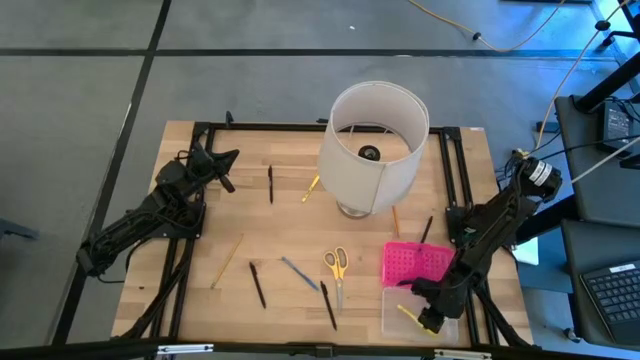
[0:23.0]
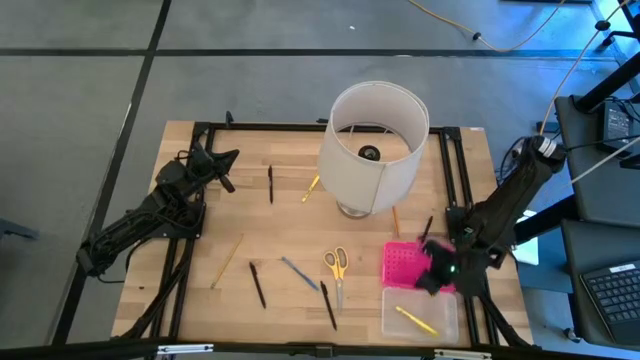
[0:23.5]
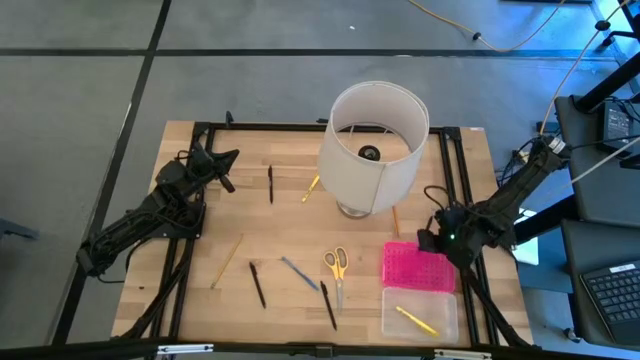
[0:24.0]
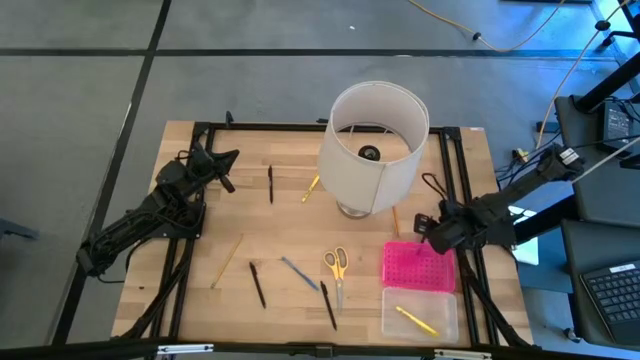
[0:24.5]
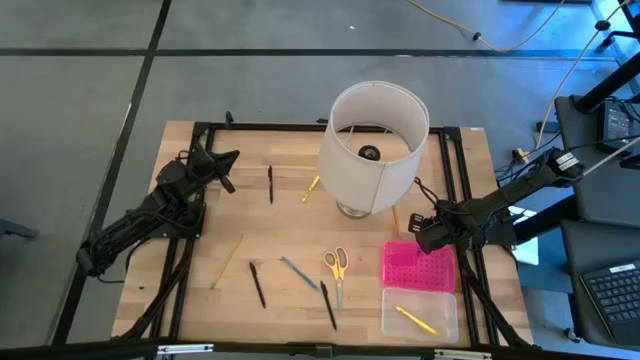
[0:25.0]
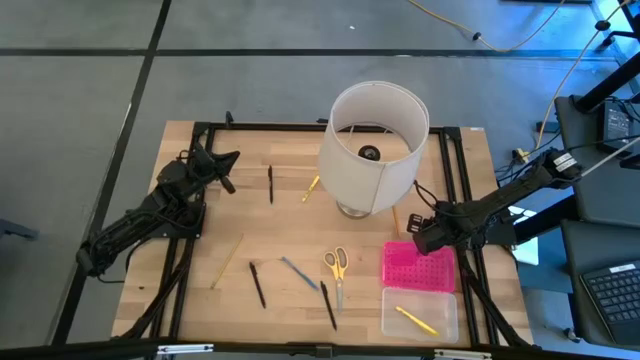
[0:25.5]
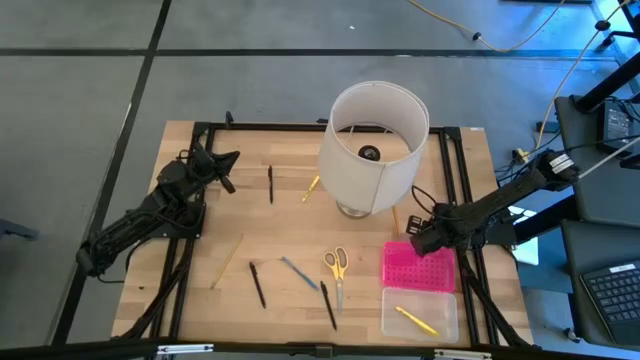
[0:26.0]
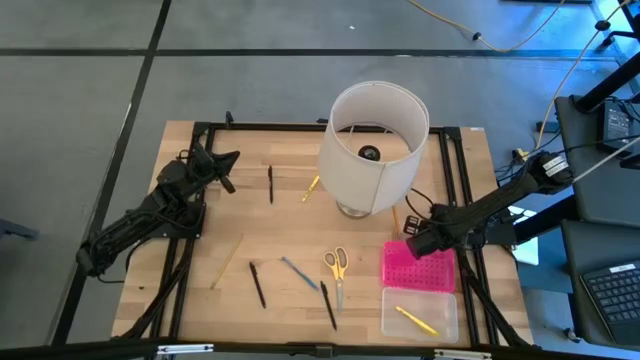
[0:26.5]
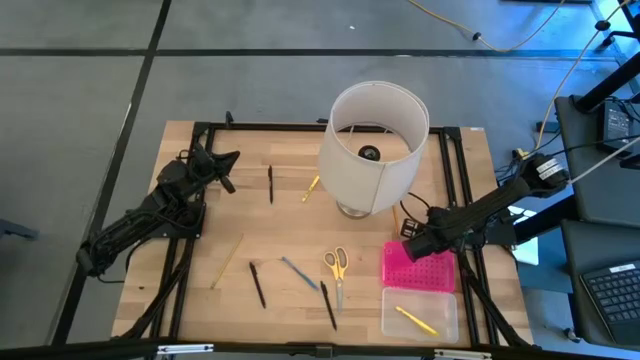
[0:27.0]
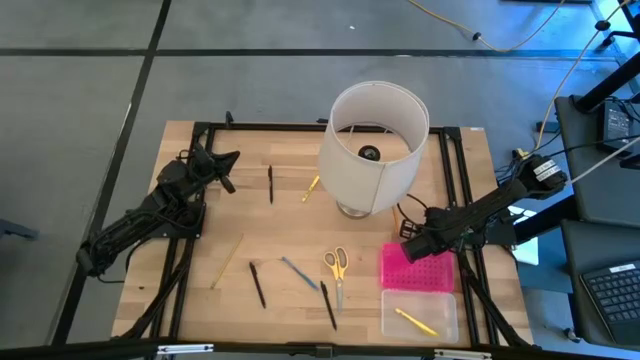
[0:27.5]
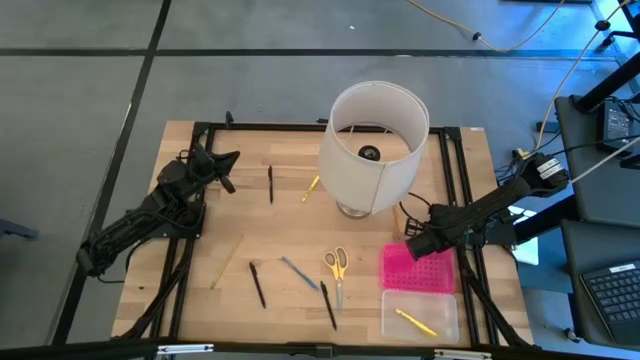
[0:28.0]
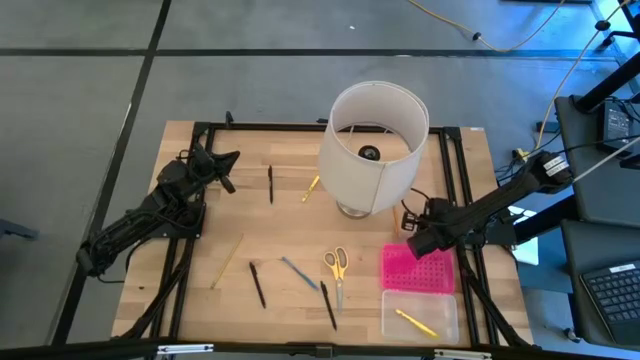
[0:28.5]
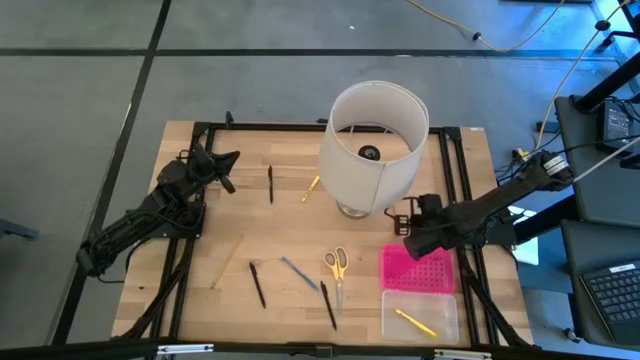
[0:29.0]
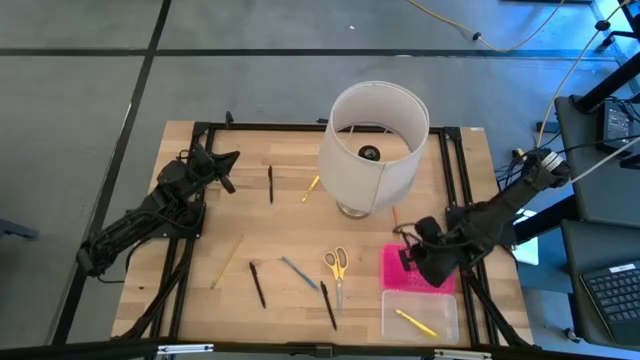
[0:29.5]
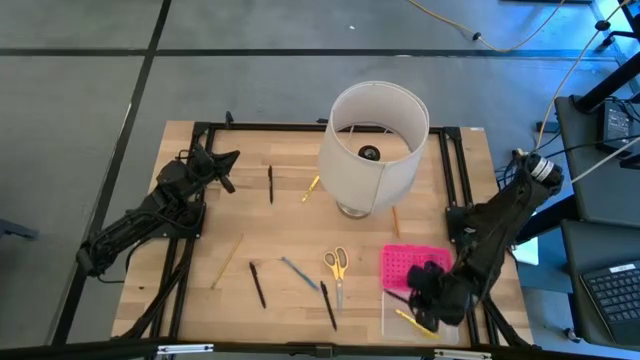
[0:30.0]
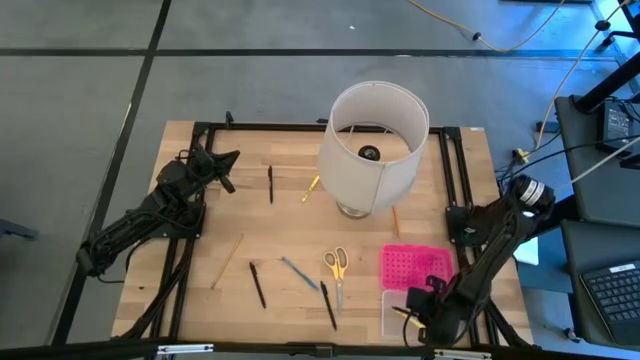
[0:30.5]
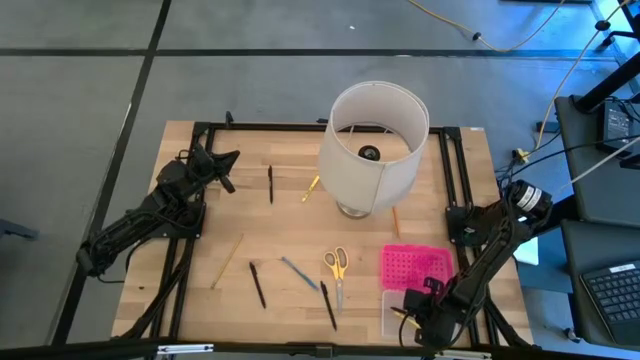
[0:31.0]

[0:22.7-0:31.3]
Task: Pick & place school supplies into a supply box
Put the black pen into the supply box

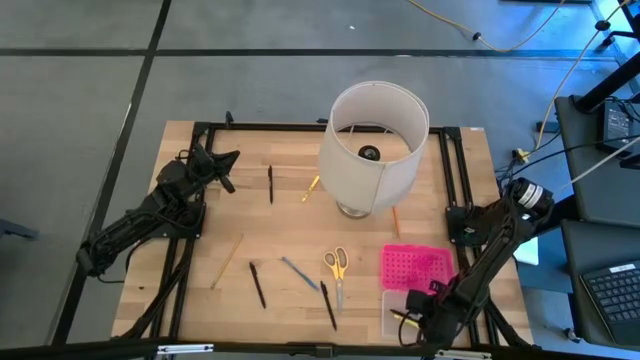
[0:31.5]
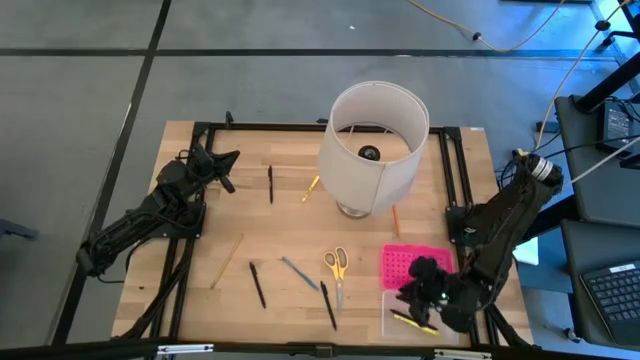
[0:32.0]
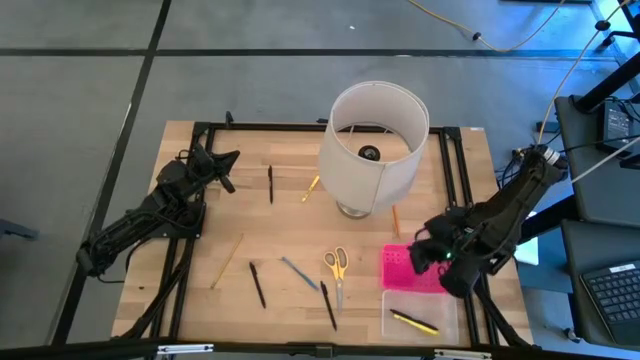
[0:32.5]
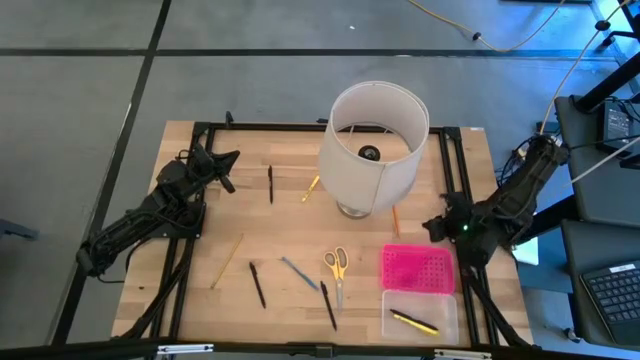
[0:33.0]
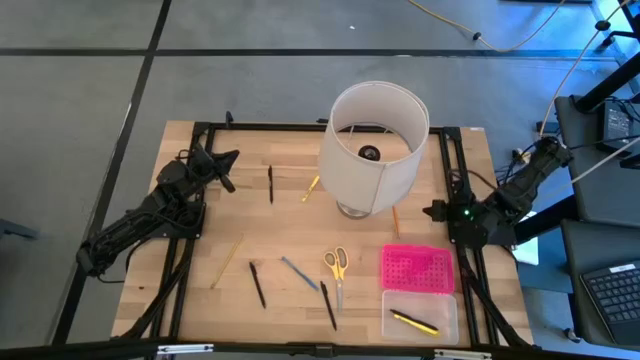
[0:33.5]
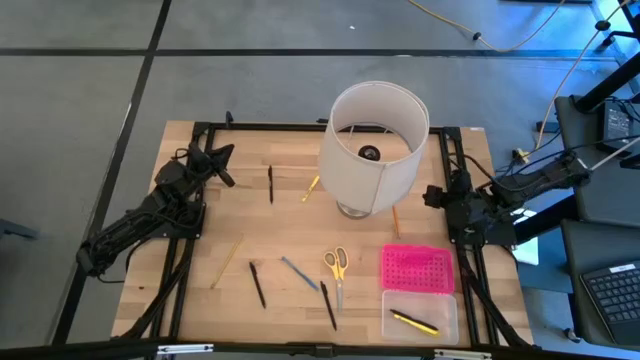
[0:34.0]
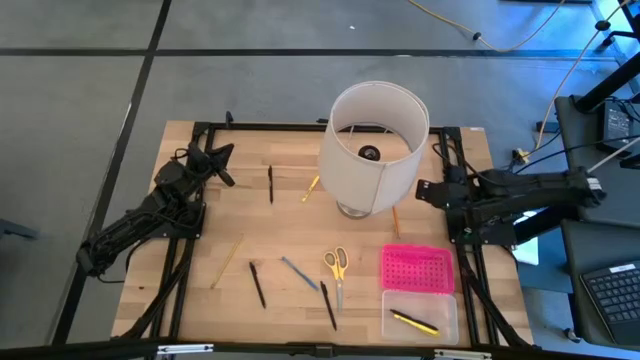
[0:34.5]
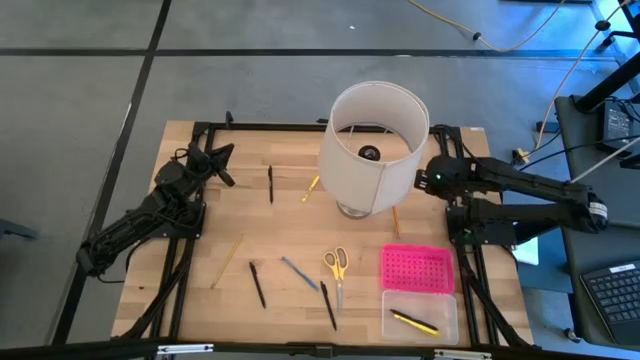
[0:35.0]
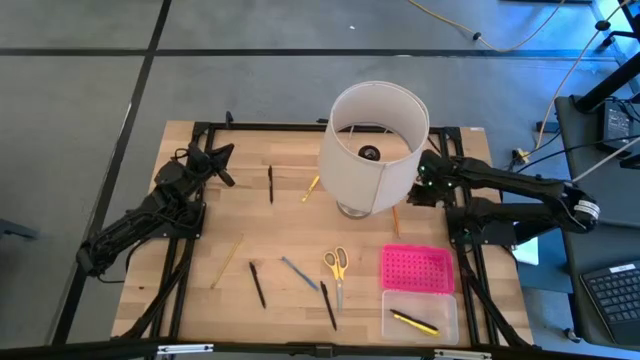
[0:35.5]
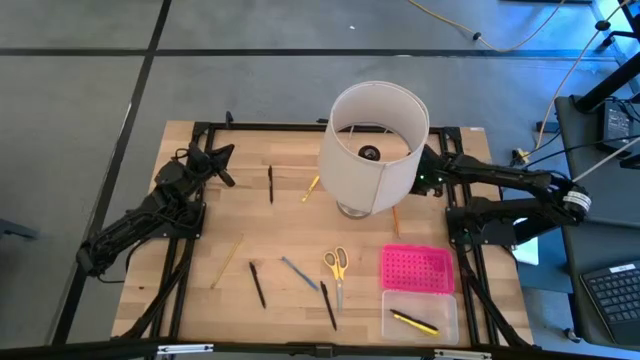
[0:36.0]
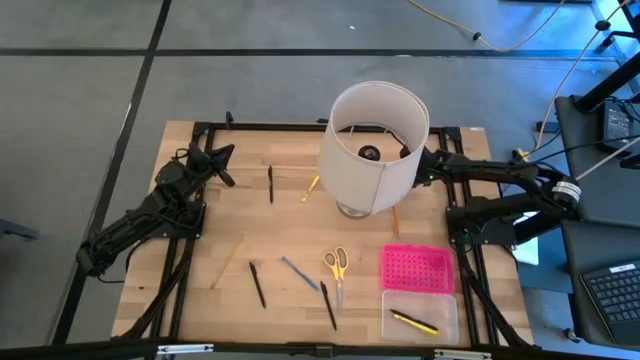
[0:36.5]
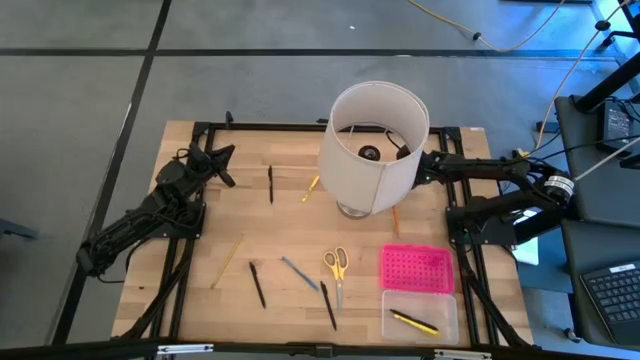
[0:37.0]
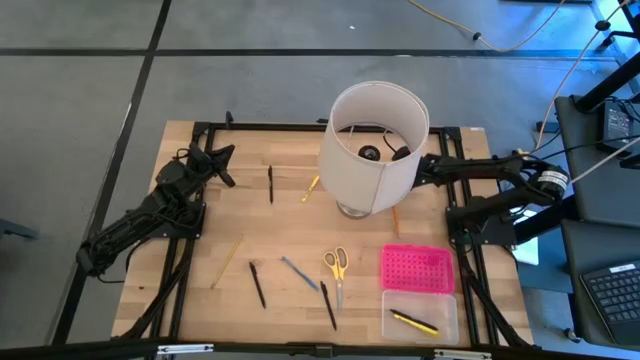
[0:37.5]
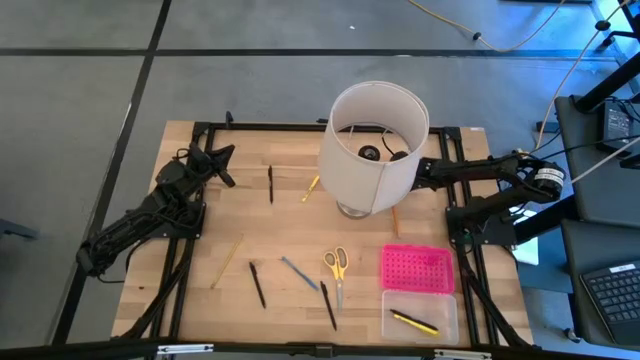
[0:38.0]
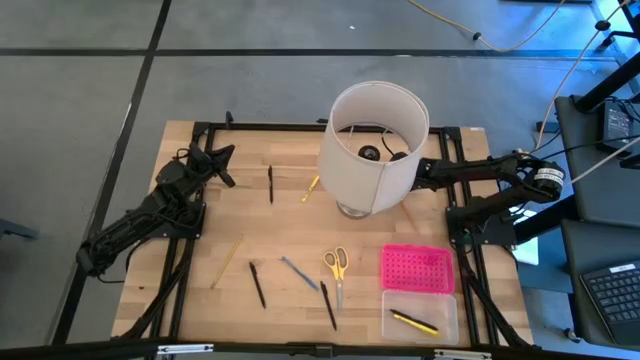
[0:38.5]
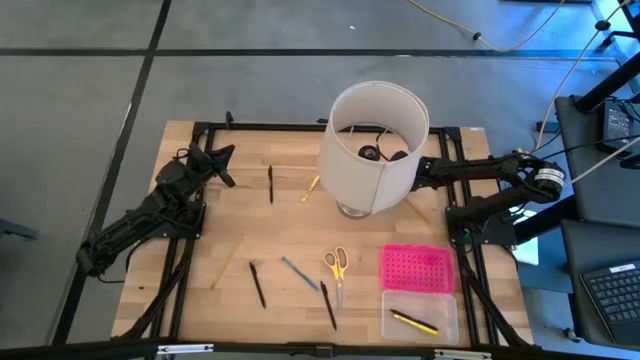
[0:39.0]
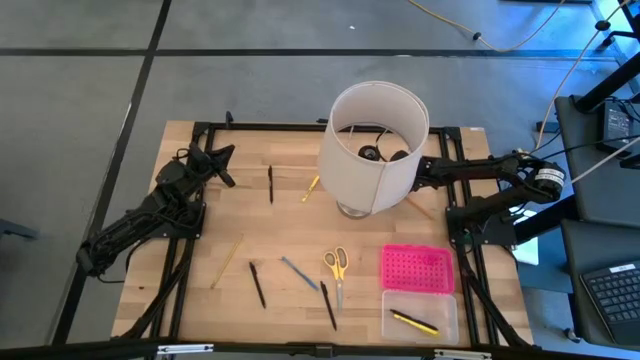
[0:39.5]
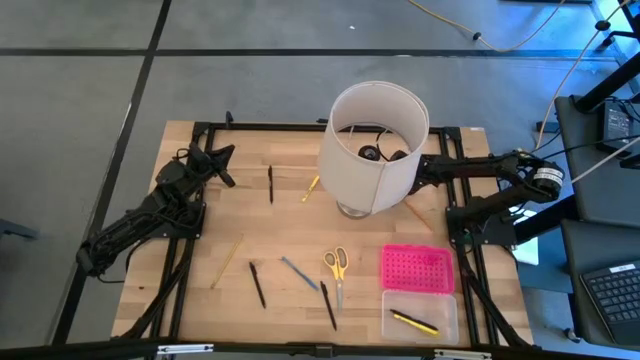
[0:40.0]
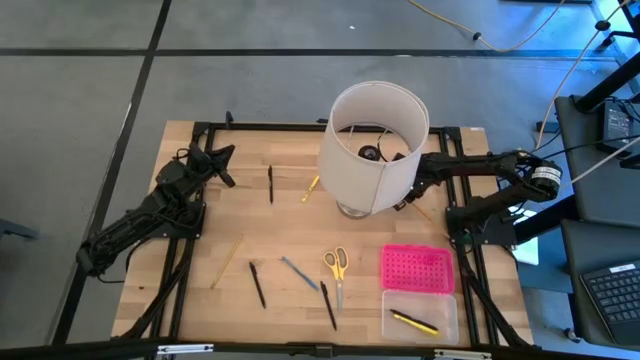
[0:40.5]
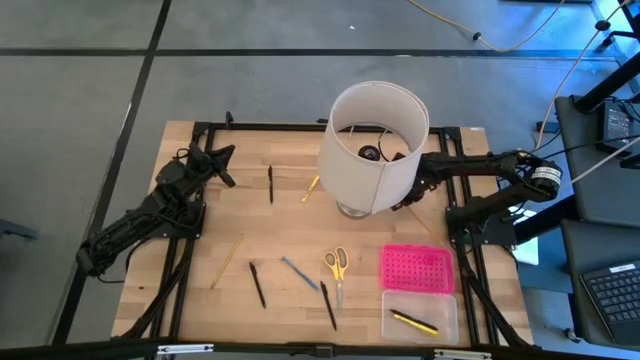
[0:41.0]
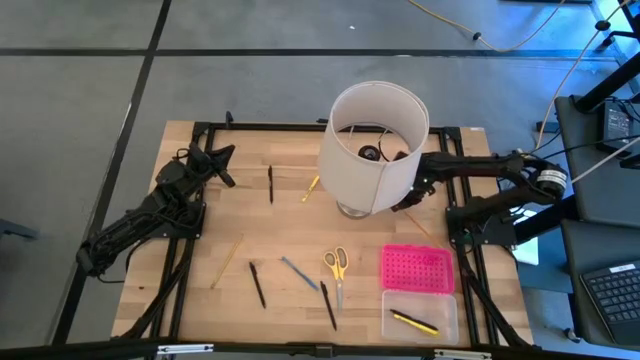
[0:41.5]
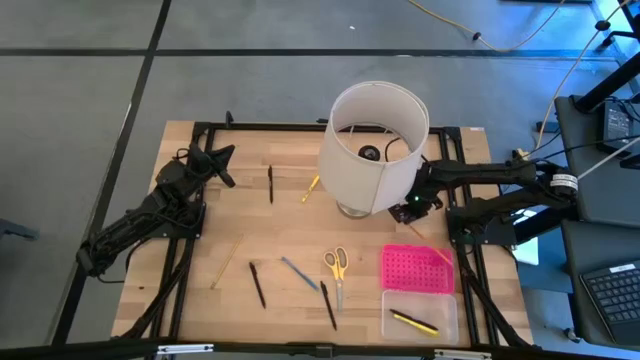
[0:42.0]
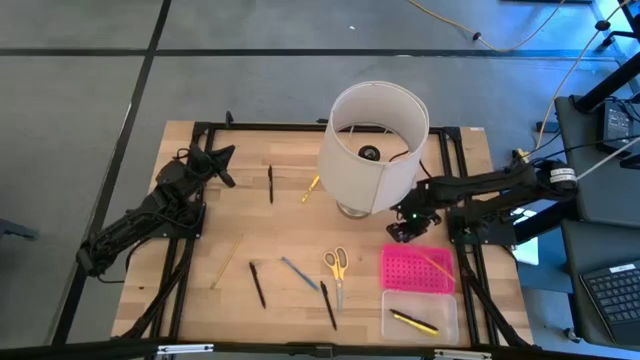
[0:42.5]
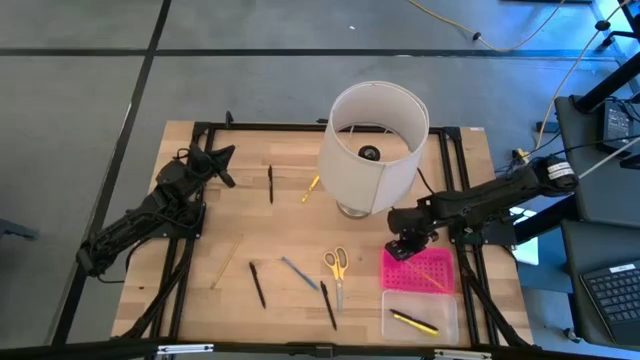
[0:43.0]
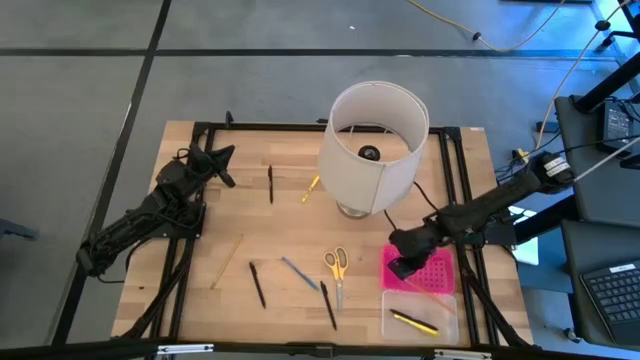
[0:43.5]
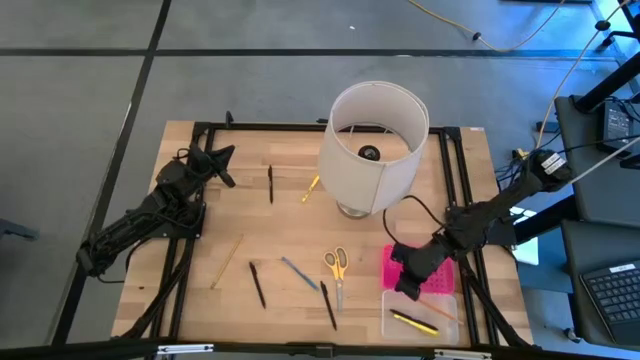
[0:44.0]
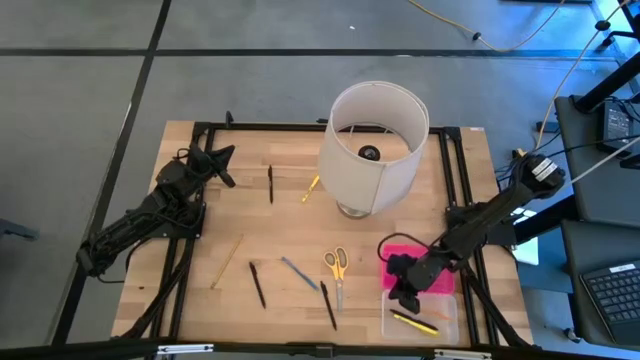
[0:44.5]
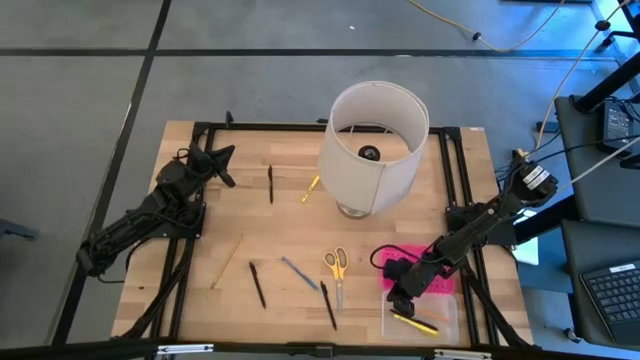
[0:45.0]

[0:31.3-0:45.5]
Put the yellow pencil into the supply box
